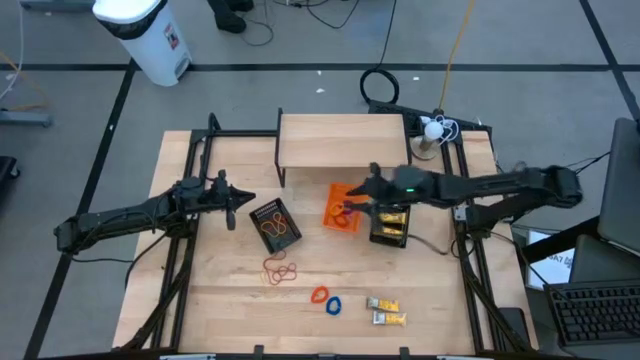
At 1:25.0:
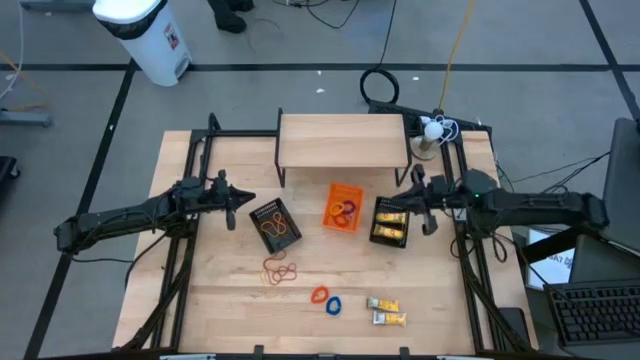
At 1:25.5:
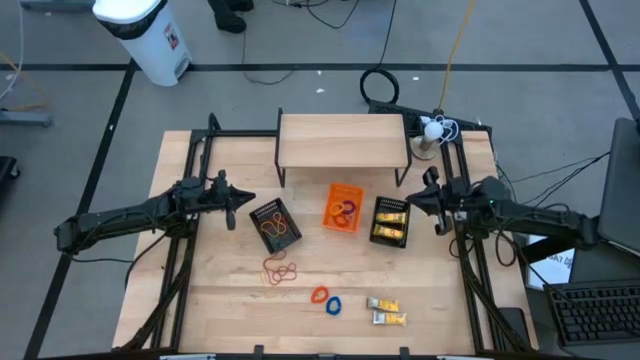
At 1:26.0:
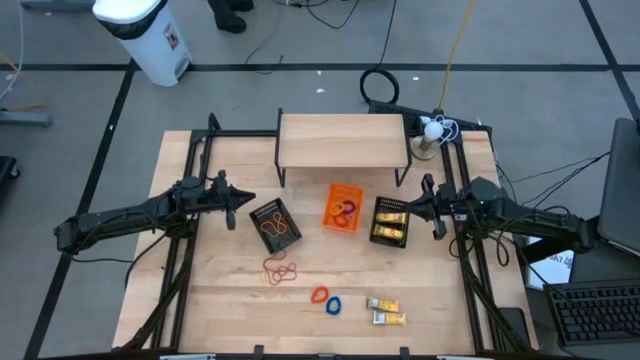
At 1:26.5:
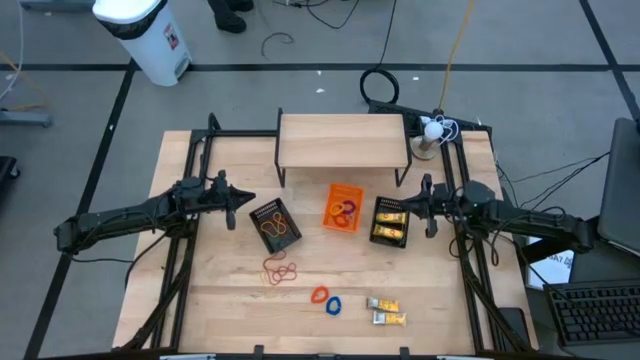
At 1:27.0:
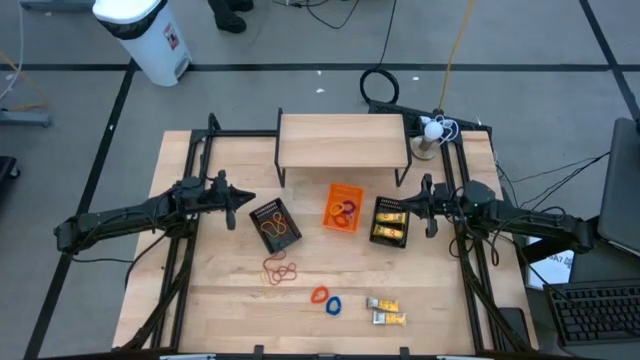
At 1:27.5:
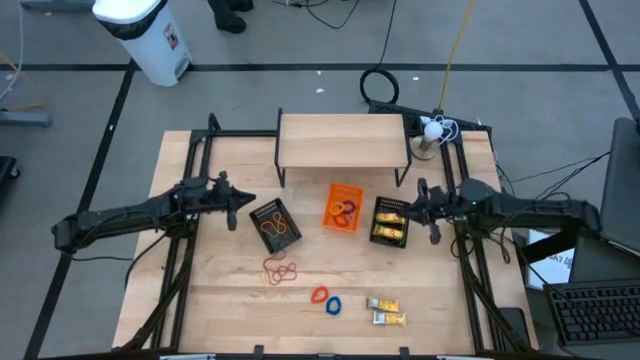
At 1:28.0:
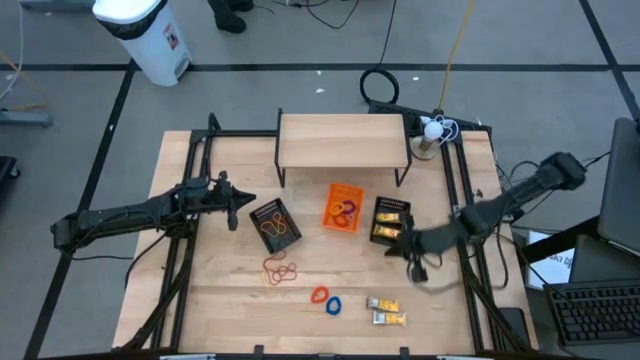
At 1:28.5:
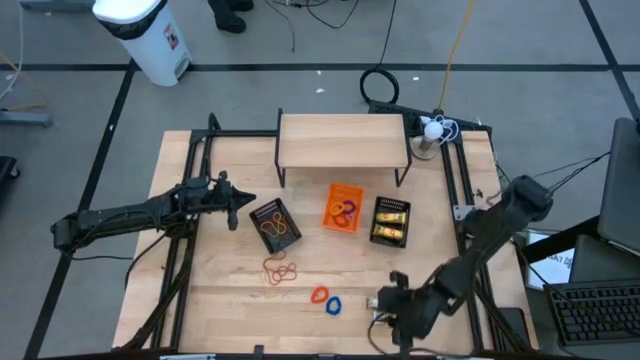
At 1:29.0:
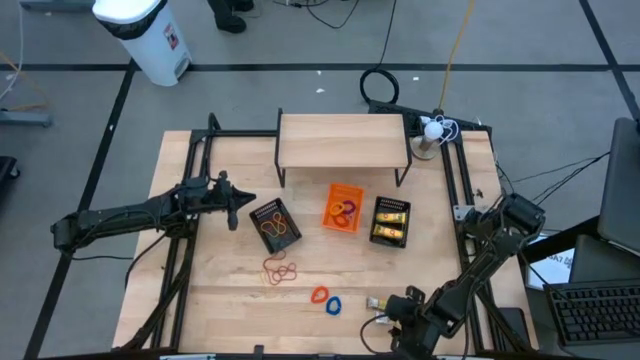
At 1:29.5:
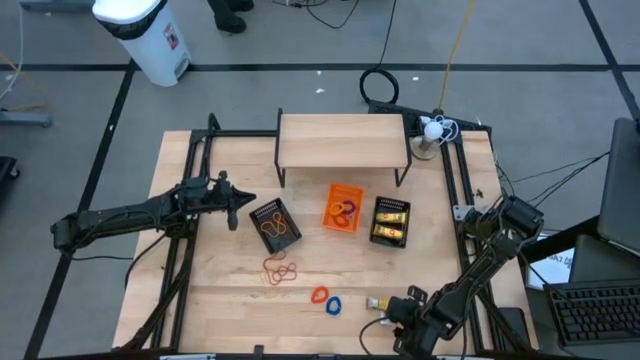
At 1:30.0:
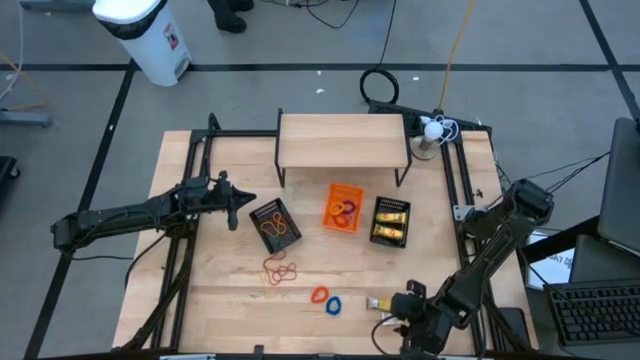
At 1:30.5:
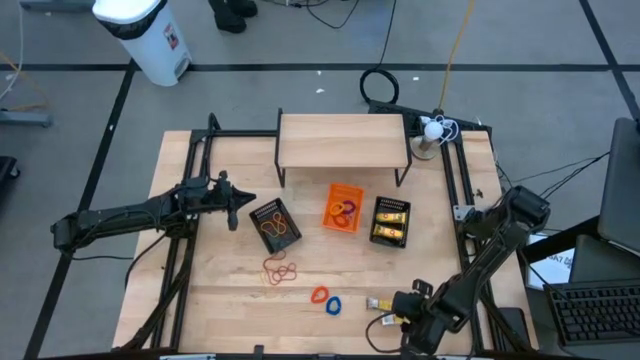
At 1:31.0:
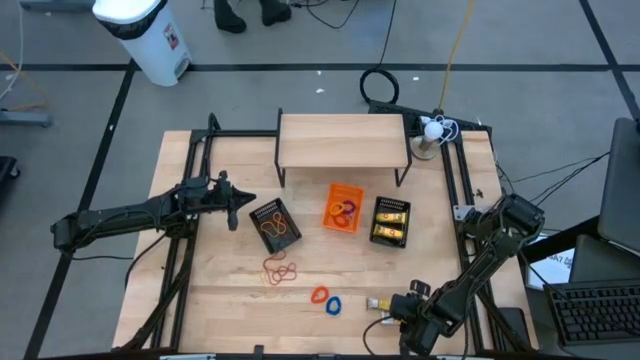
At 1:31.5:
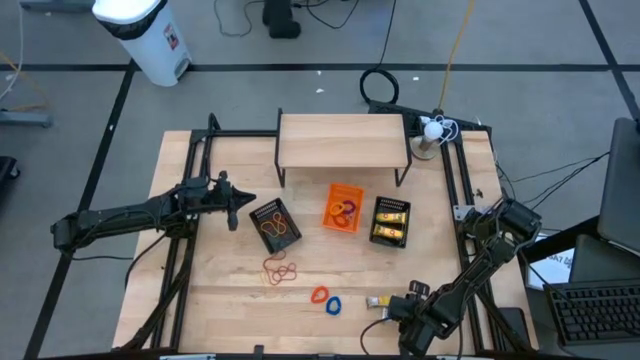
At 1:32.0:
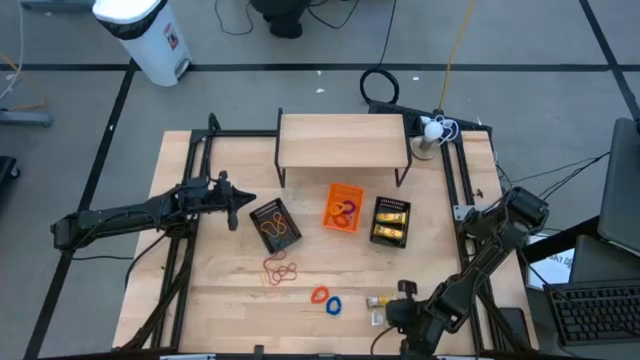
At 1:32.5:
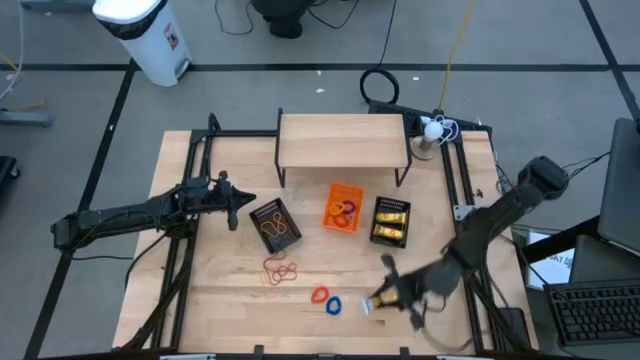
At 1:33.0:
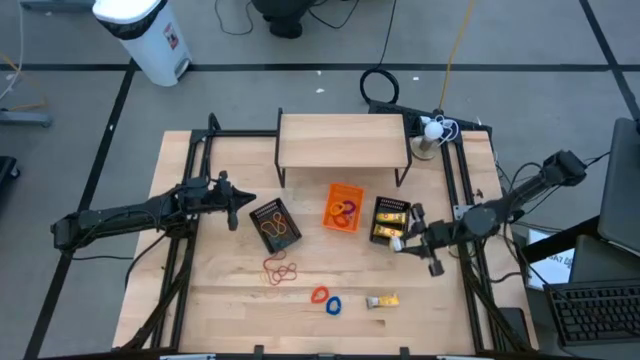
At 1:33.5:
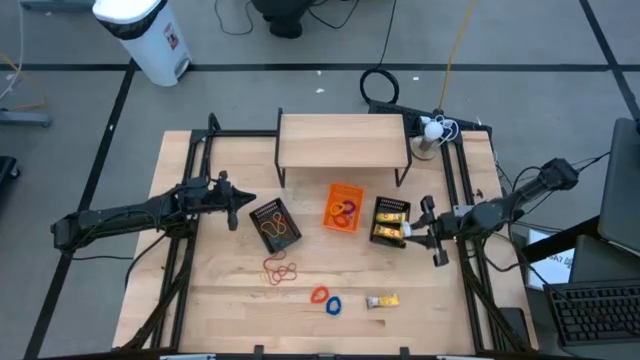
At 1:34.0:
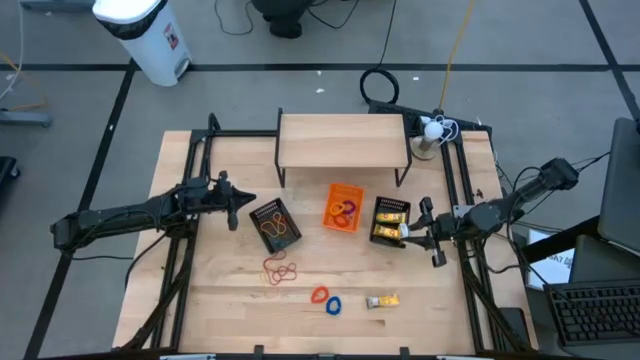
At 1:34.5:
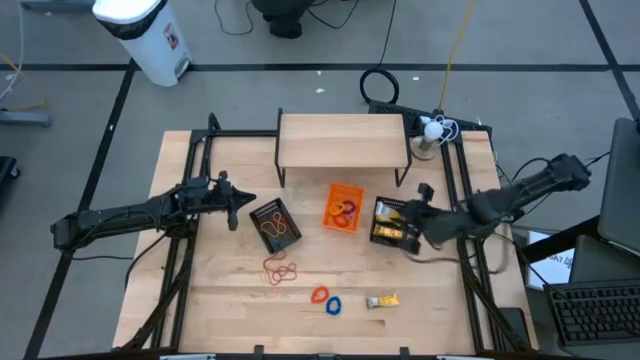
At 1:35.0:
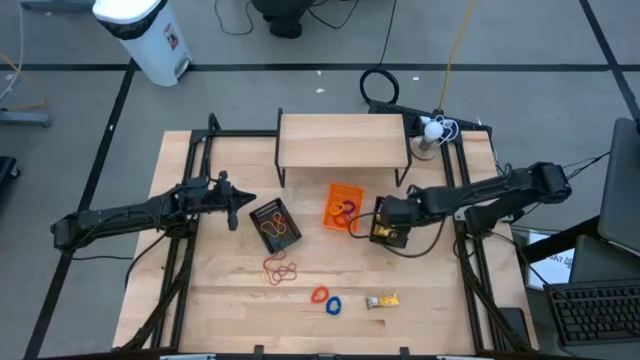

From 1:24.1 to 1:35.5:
Task: Pick & Place Office Desk Supplies
Put the crayon box into the right black bin

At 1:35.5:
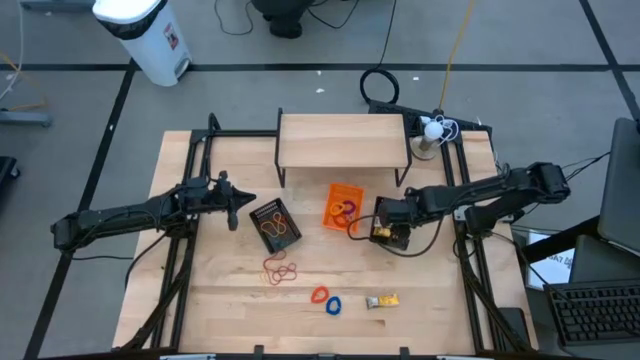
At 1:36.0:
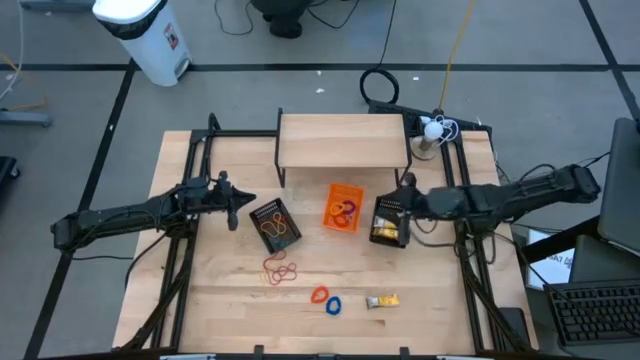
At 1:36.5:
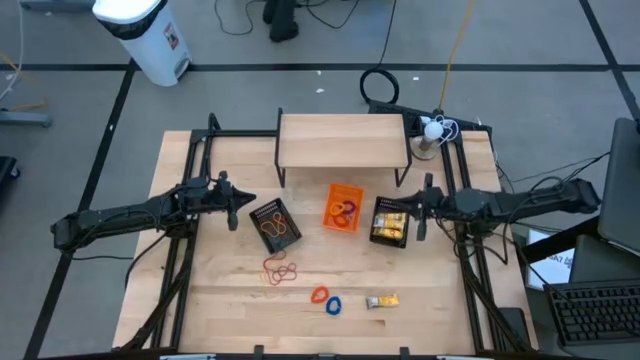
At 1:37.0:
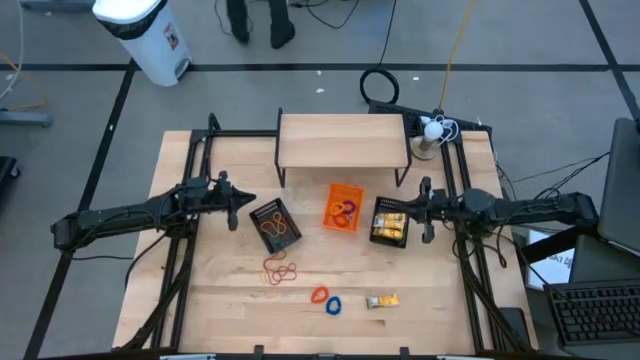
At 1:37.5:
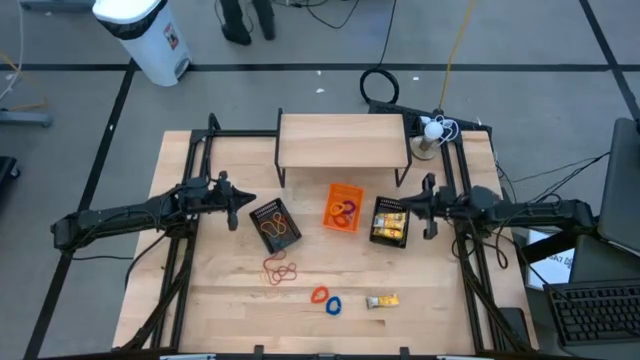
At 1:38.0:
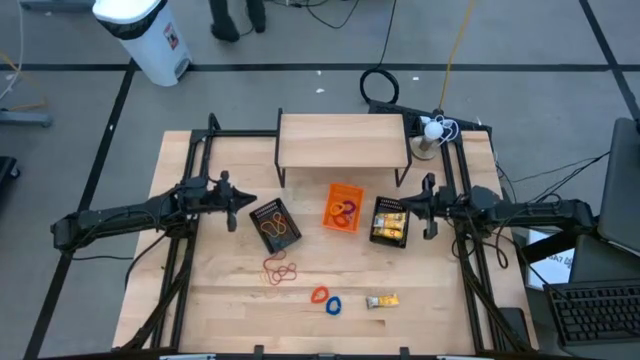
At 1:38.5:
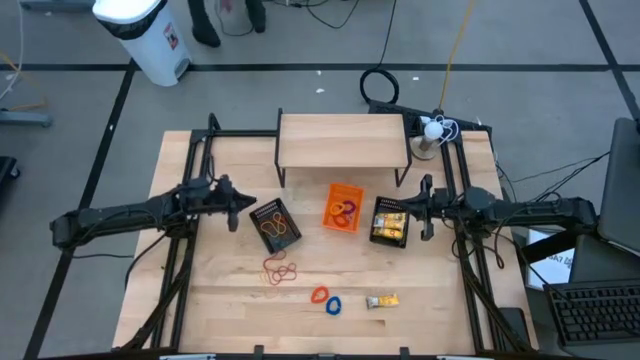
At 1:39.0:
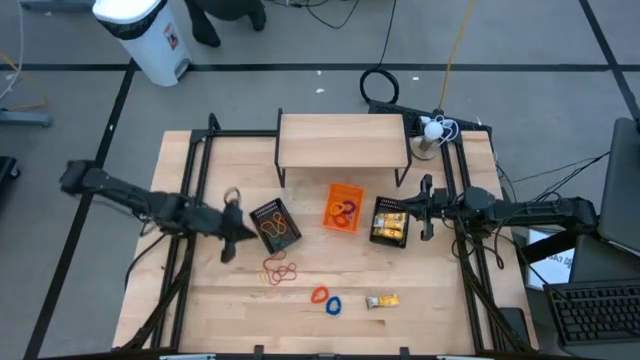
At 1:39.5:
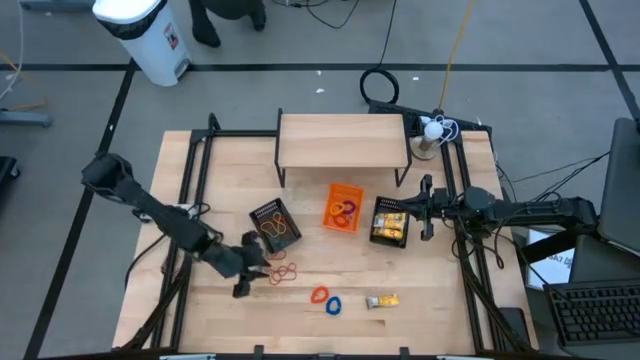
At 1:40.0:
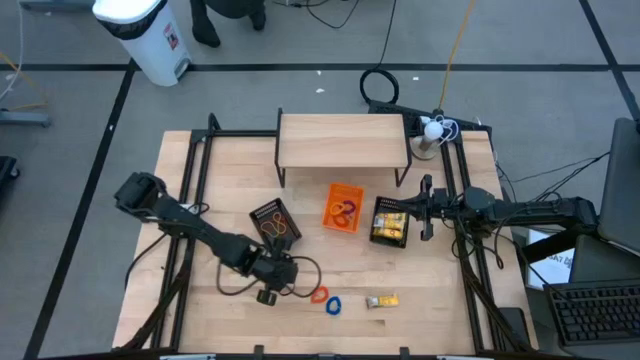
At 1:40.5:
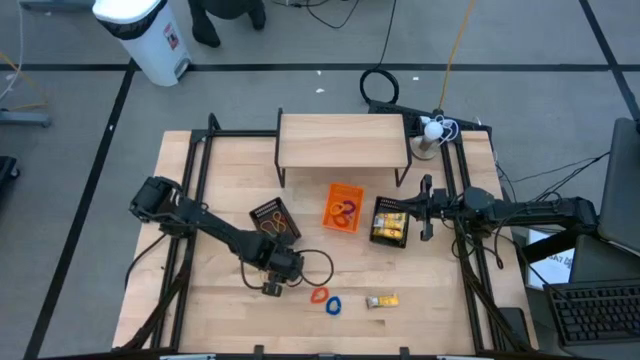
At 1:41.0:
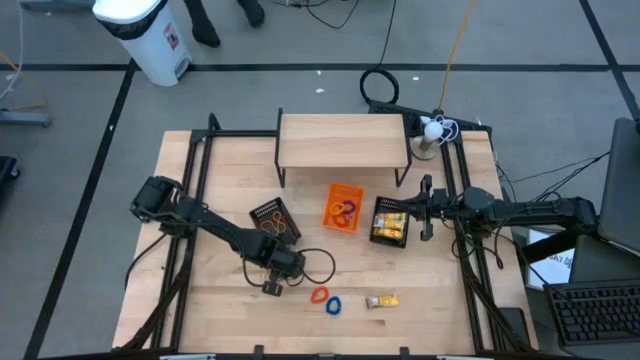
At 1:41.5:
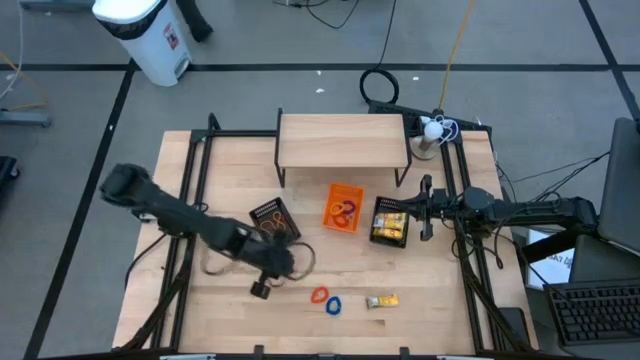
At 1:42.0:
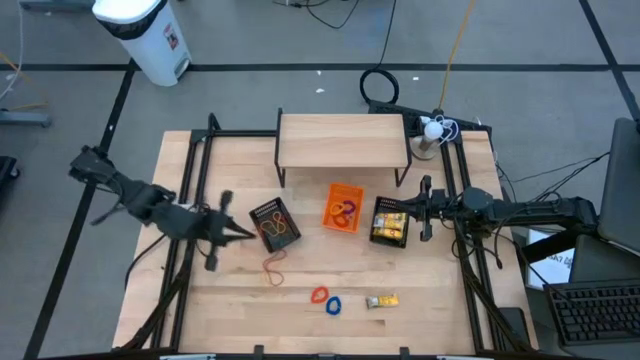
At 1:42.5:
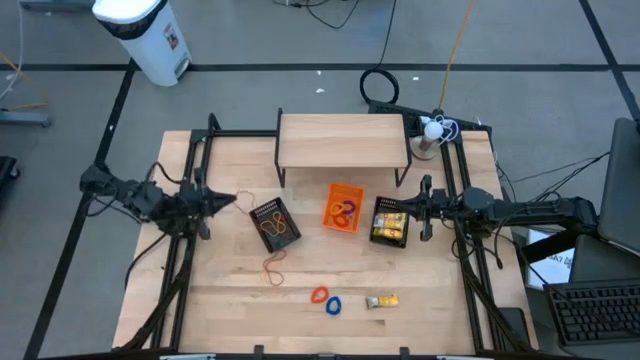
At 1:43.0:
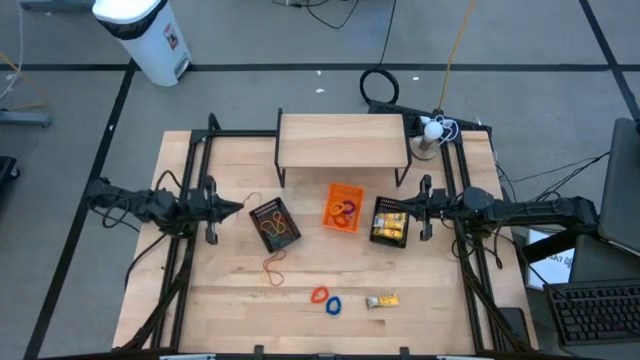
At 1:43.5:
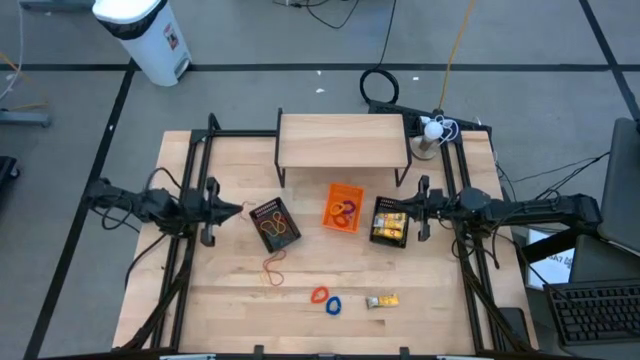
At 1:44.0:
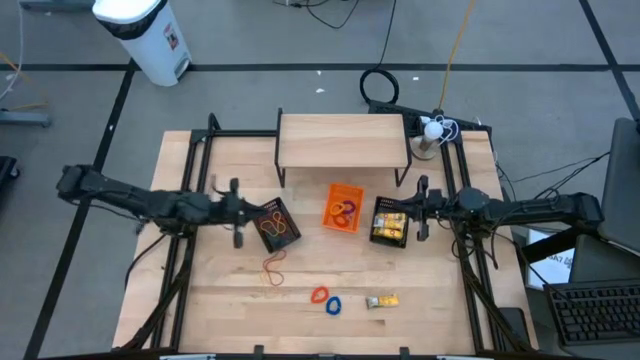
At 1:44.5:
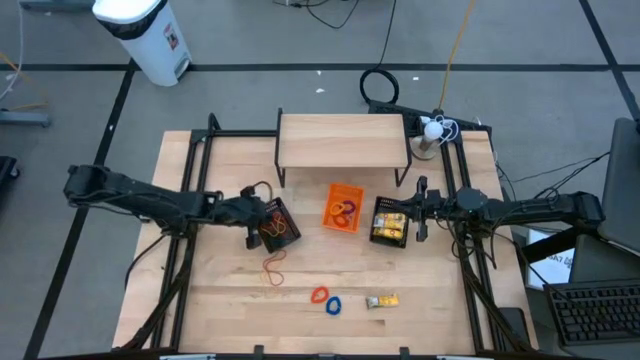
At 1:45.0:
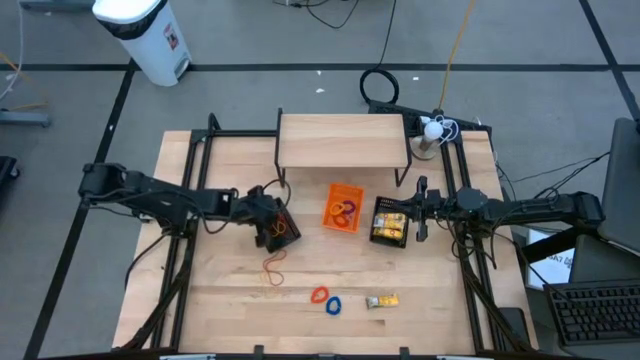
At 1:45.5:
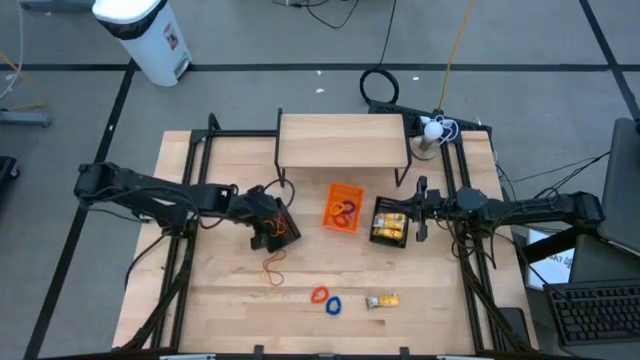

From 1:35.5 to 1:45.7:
Put the red rubber band into the left black bin
